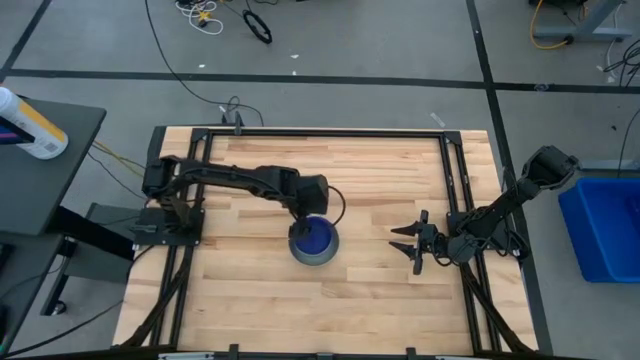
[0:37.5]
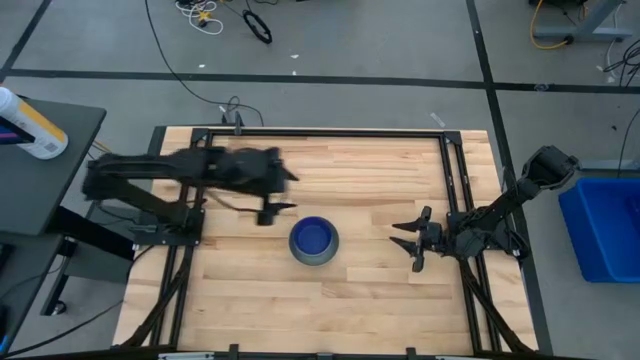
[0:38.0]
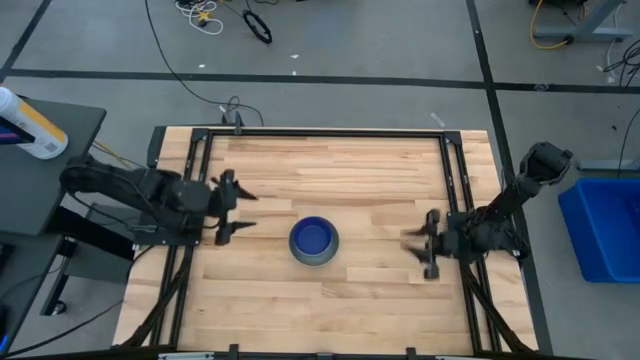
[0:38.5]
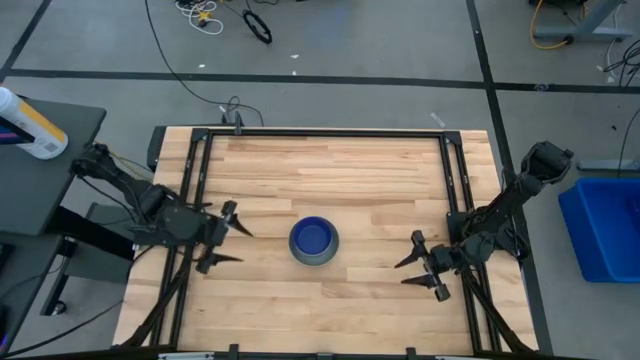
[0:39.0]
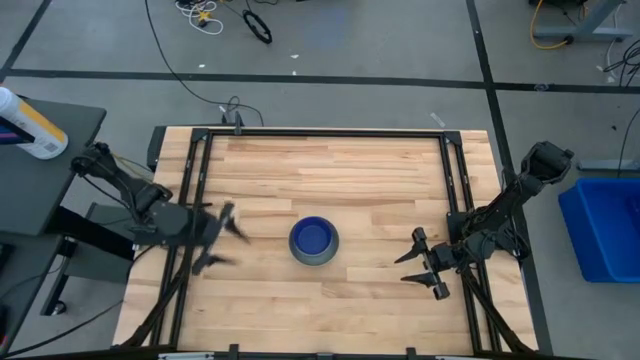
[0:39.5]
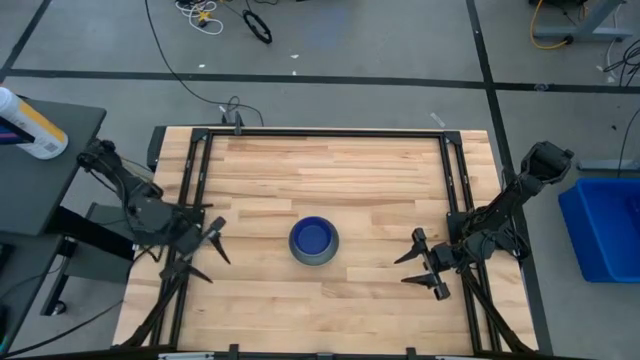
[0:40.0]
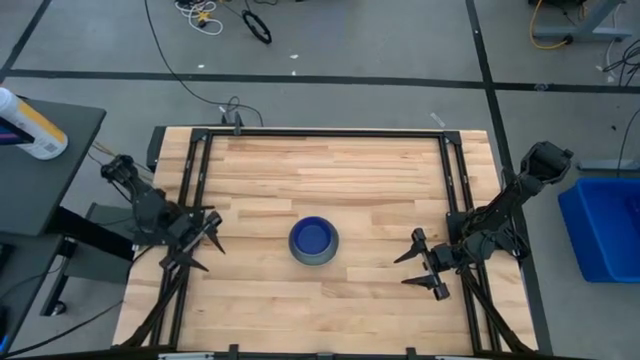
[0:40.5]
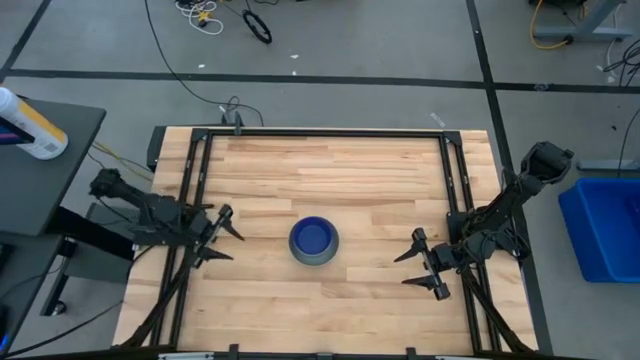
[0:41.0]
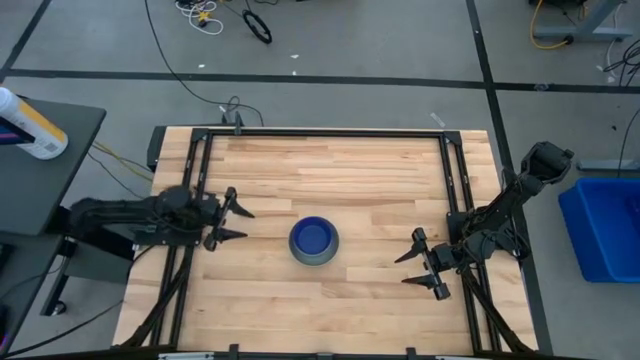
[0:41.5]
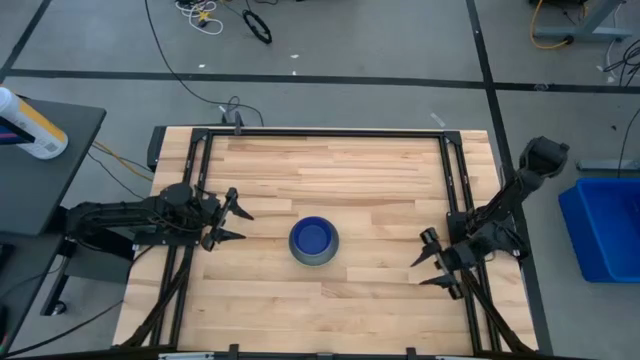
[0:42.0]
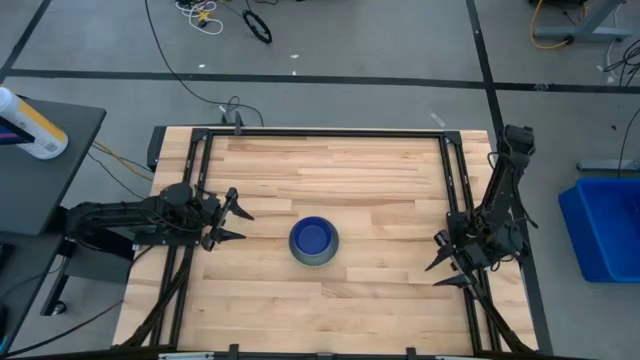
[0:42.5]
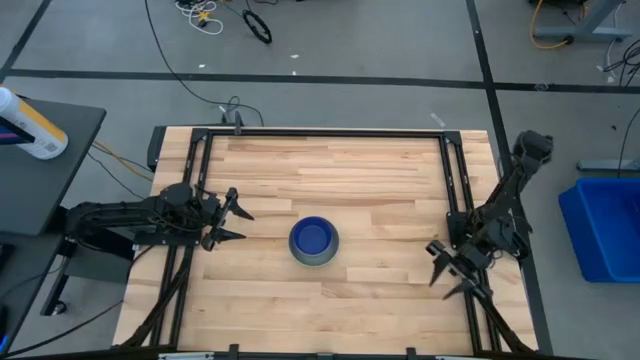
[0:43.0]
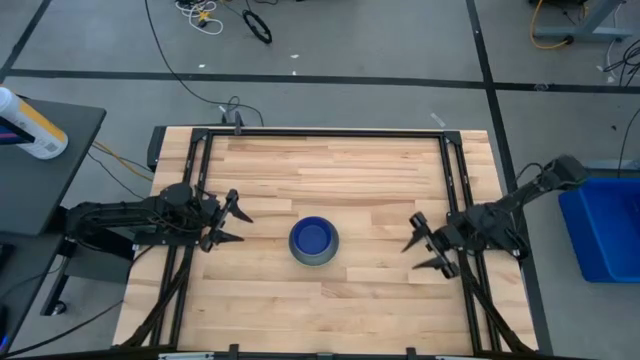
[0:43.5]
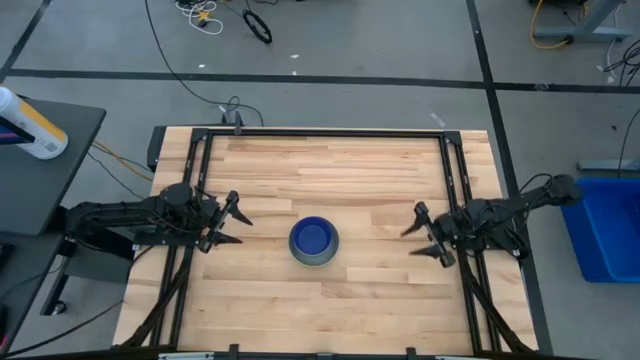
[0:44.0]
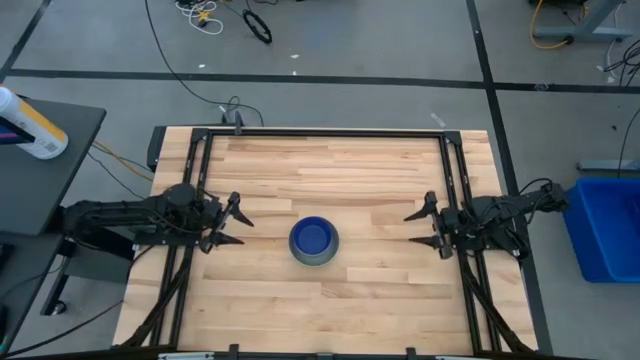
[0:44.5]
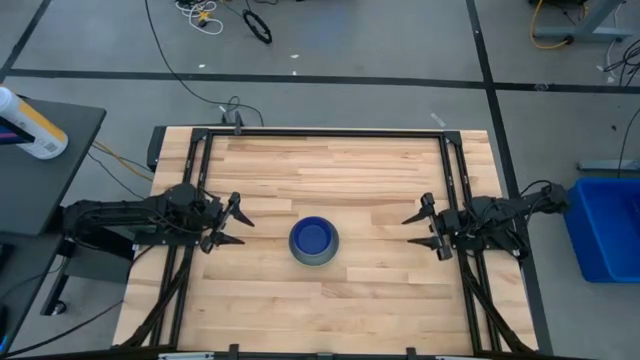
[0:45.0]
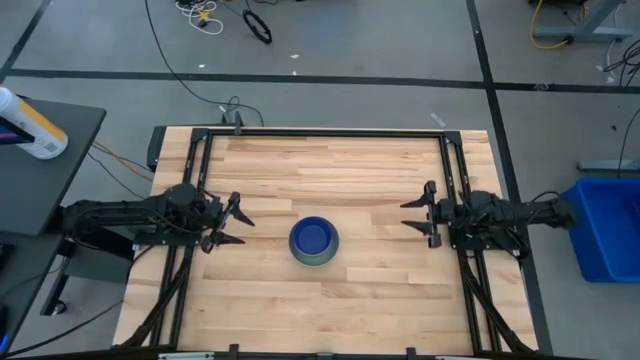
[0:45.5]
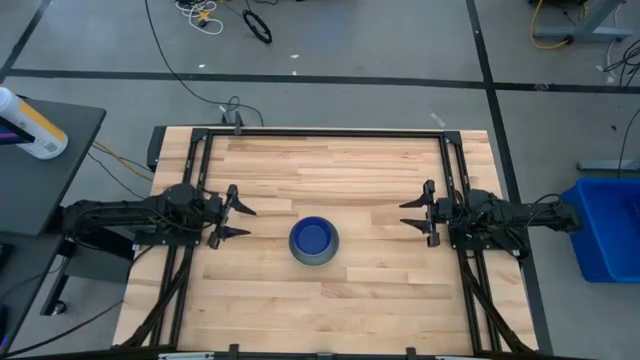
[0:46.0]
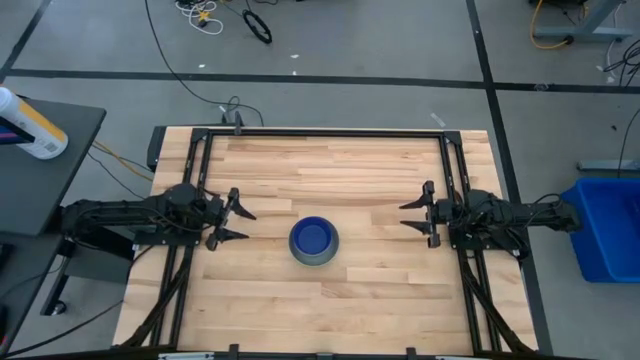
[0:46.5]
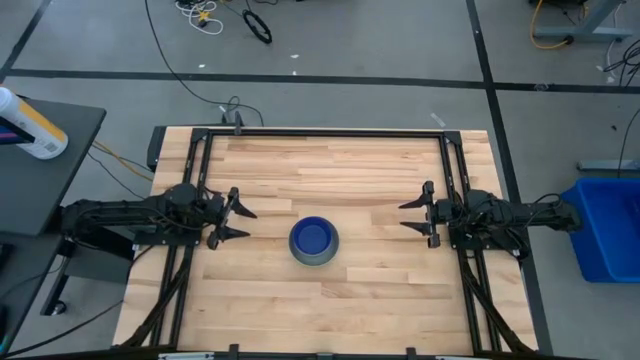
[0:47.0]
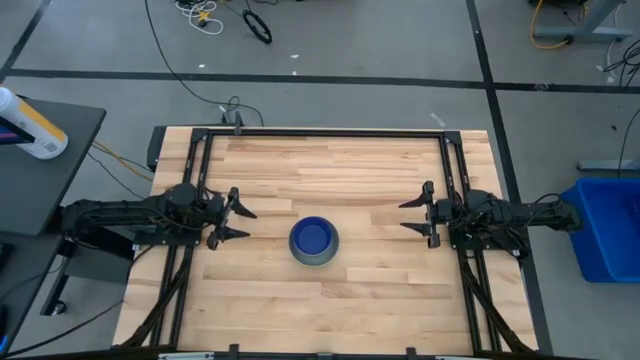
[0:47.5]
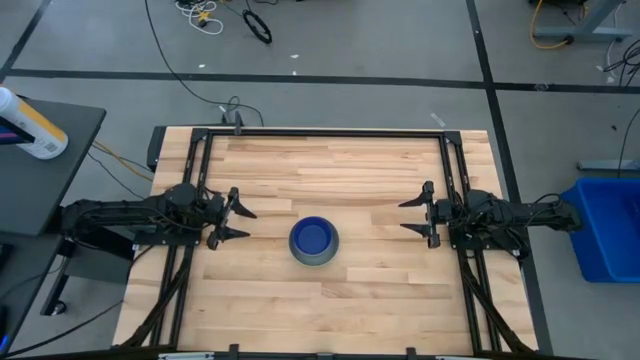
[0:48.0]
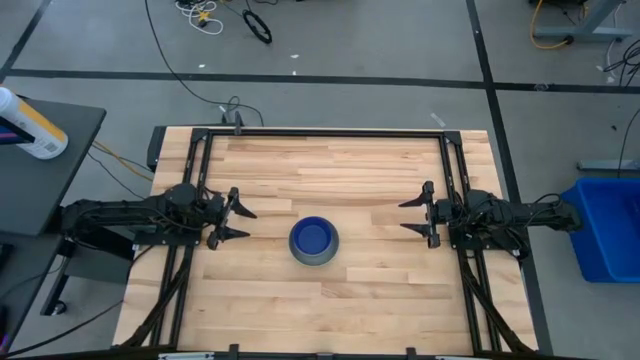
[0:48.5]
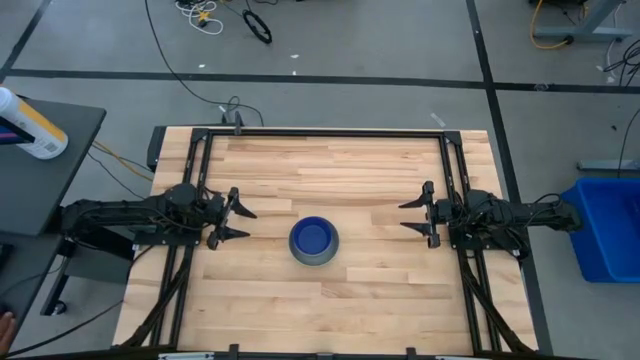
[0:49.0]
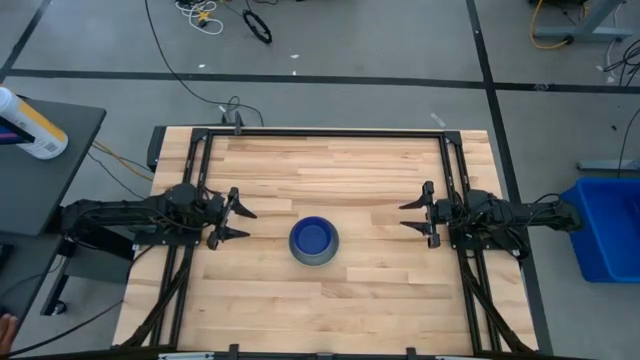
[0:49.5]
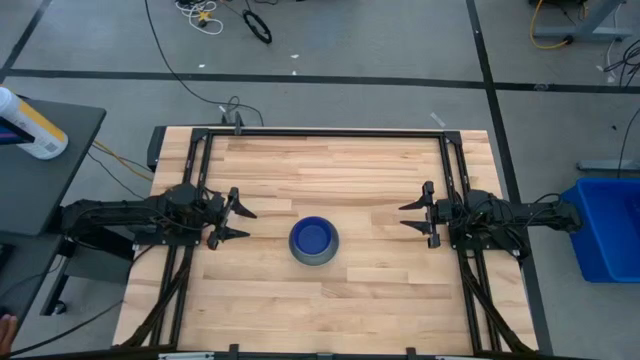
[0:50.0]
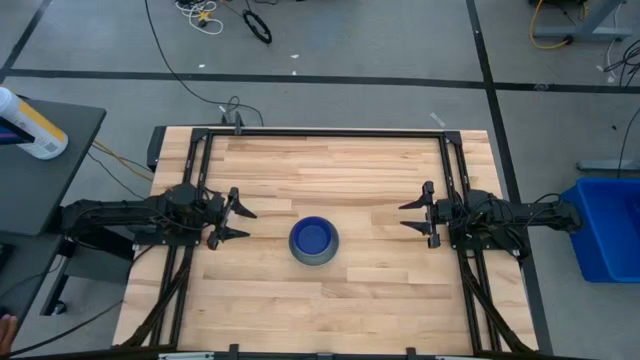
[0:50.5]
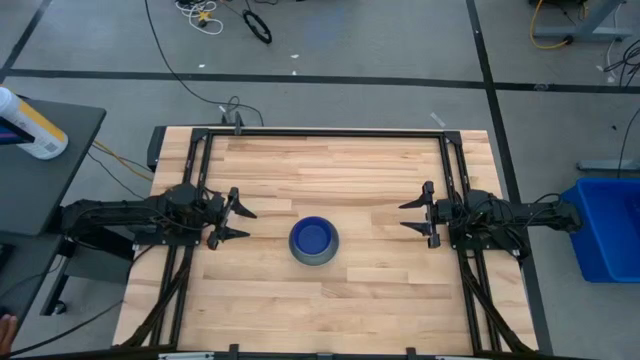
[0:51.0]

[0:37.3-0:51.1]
Return to Home Position

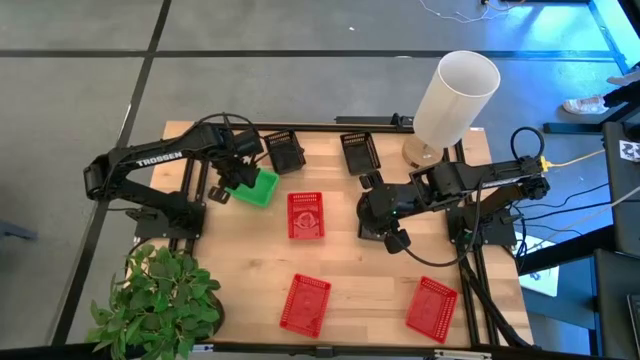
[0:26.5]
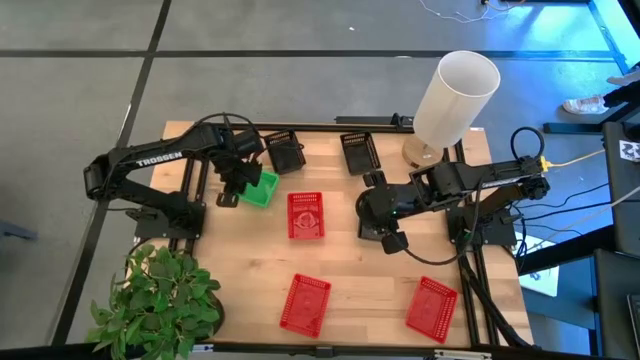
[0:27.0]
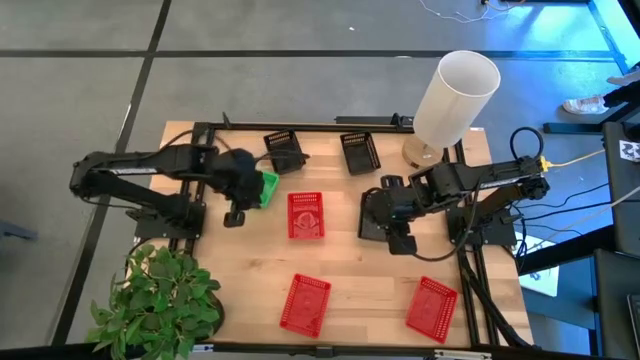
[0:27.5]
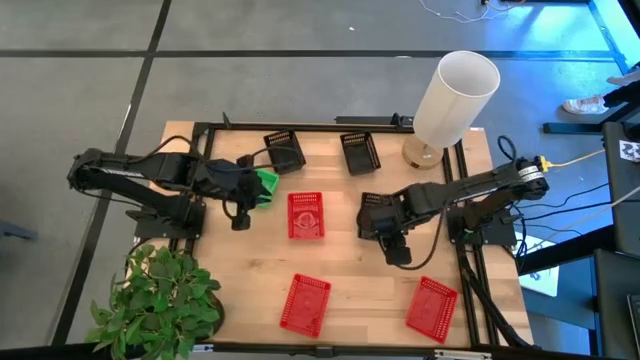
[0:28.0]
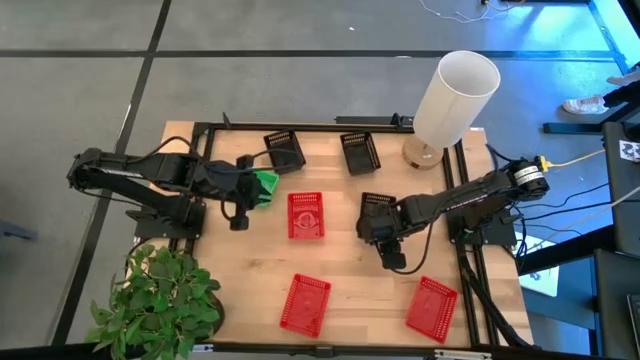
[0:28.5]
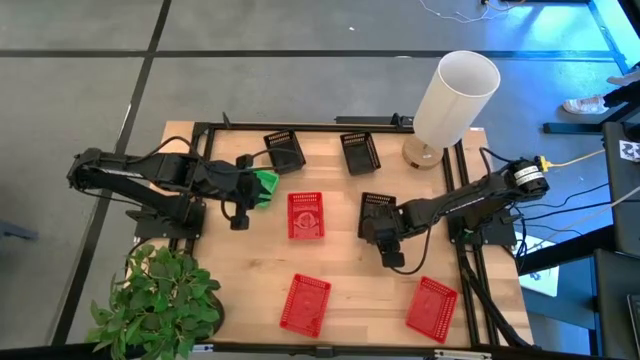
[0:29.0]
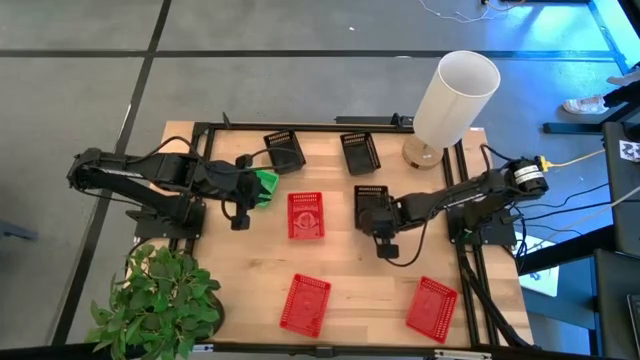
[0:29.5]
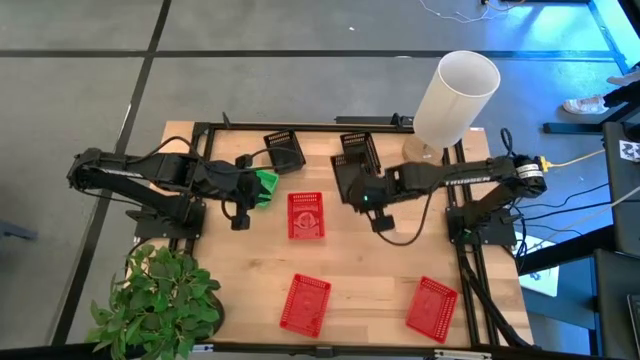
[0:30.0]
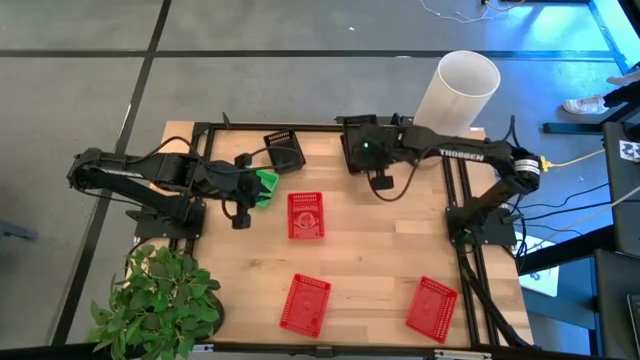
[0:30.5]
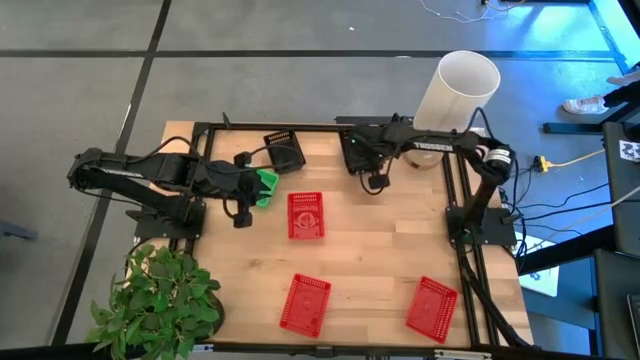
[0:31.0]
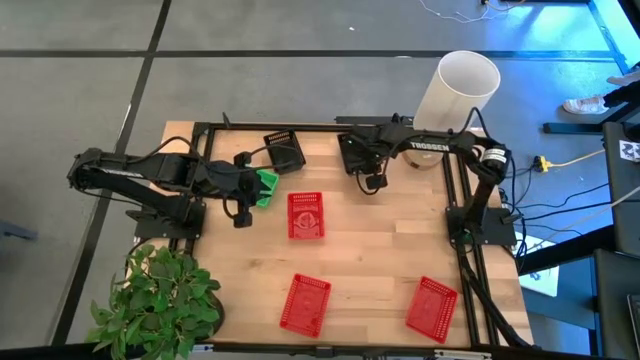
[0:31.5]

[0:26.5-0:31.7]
Stack the bottom black bin on the right black bin
